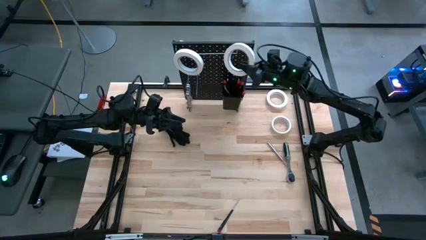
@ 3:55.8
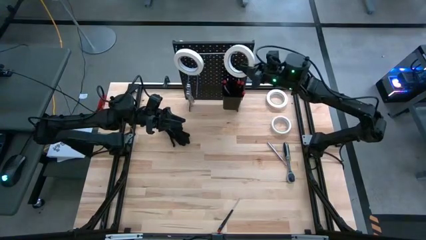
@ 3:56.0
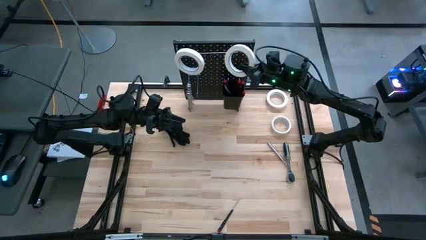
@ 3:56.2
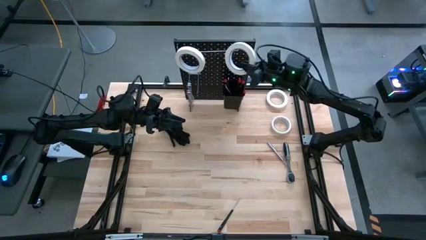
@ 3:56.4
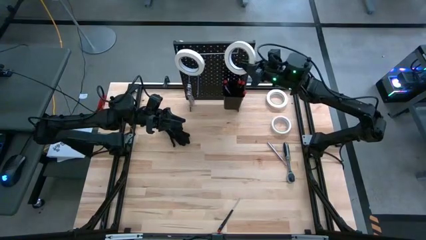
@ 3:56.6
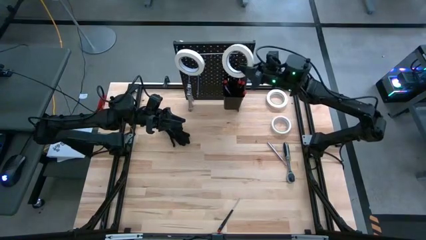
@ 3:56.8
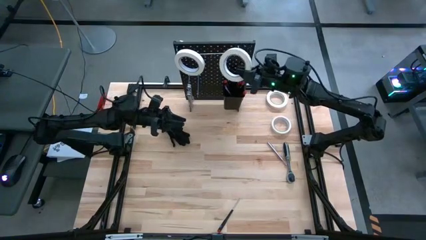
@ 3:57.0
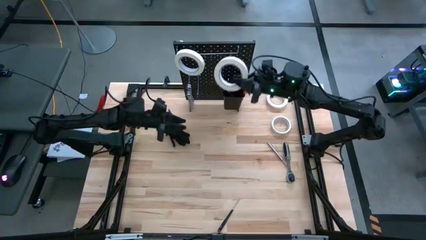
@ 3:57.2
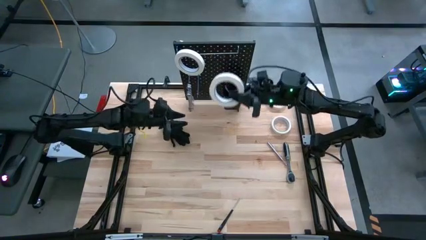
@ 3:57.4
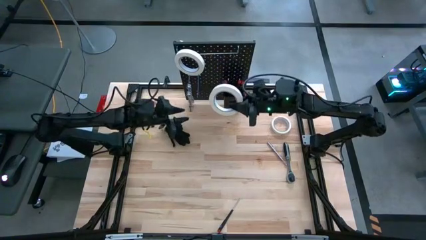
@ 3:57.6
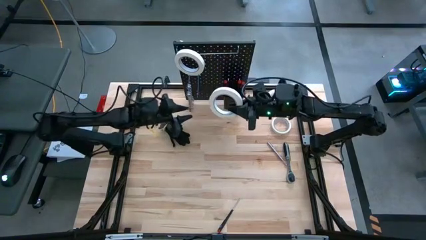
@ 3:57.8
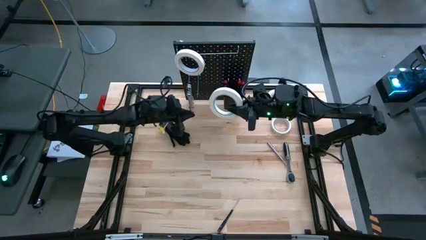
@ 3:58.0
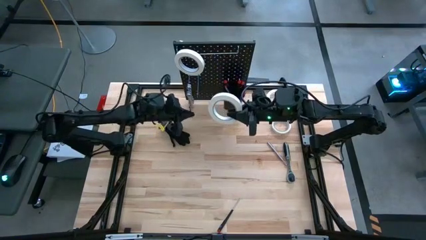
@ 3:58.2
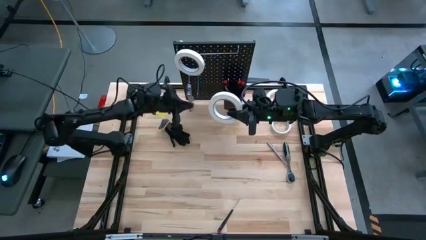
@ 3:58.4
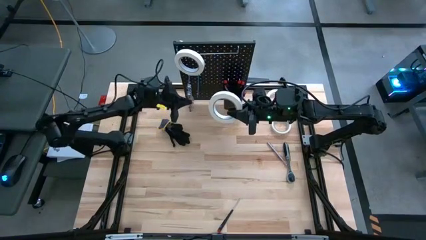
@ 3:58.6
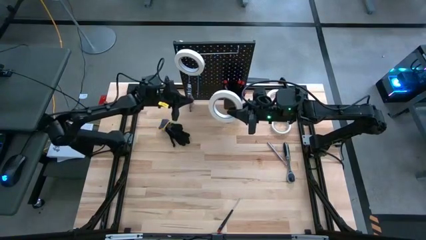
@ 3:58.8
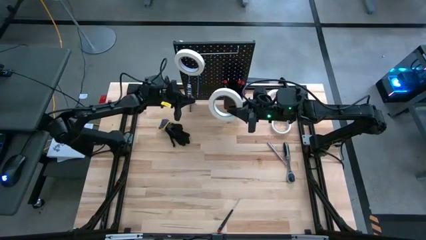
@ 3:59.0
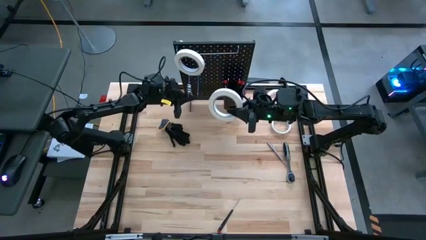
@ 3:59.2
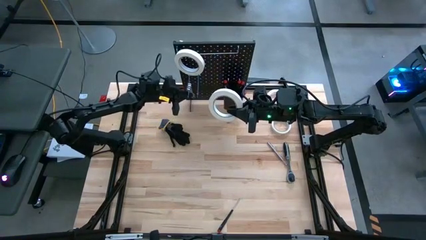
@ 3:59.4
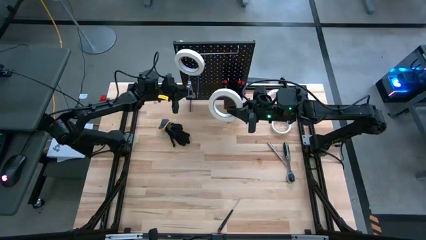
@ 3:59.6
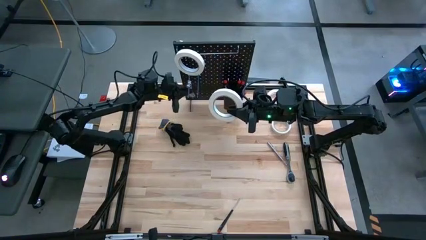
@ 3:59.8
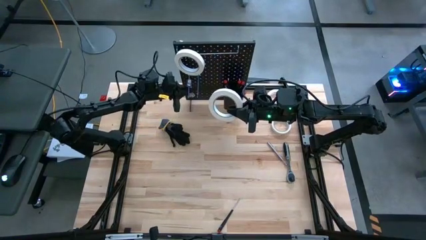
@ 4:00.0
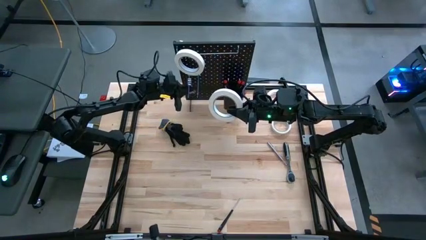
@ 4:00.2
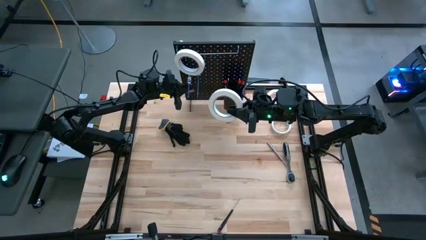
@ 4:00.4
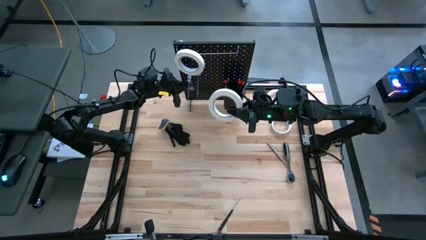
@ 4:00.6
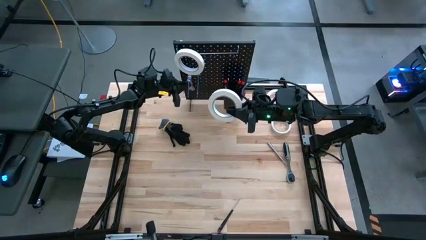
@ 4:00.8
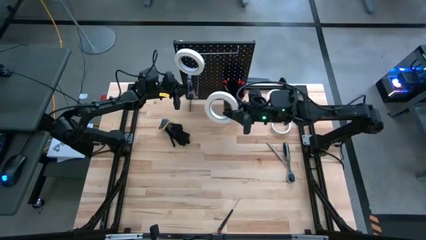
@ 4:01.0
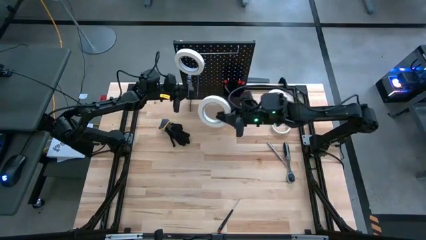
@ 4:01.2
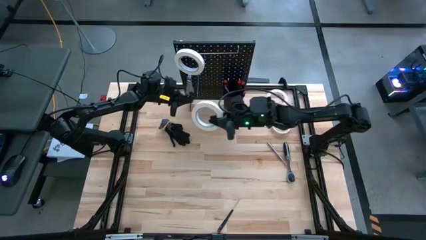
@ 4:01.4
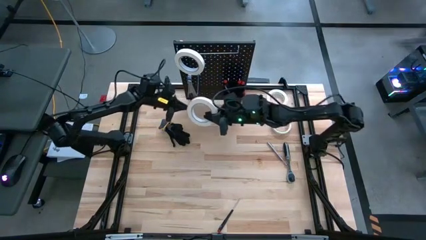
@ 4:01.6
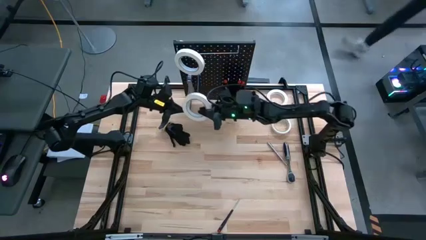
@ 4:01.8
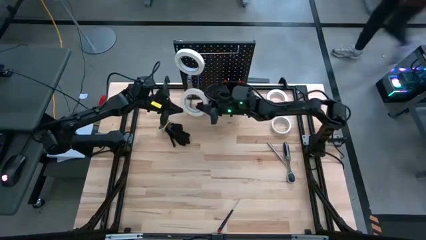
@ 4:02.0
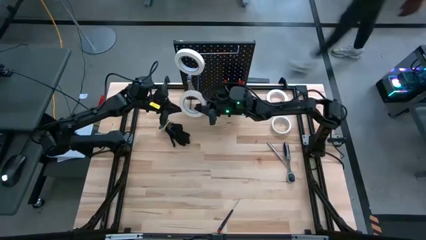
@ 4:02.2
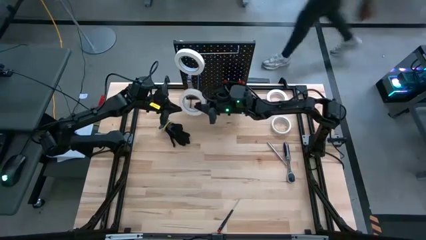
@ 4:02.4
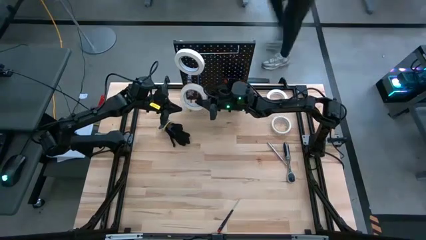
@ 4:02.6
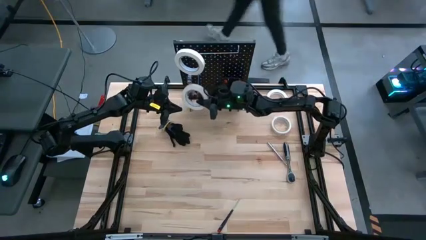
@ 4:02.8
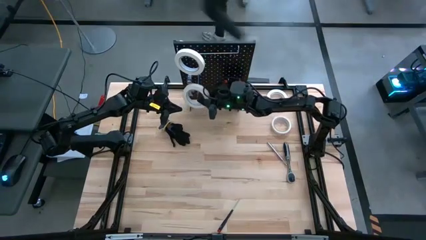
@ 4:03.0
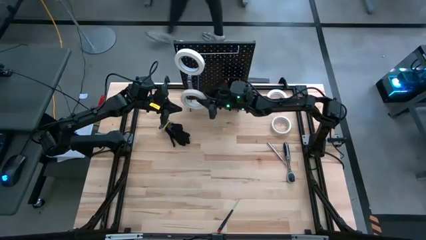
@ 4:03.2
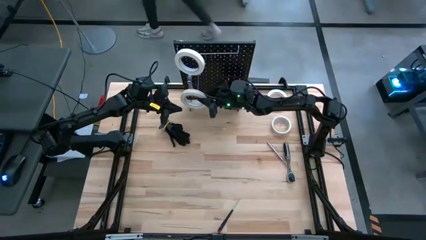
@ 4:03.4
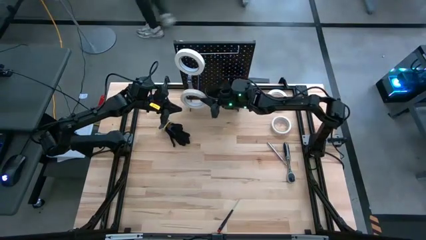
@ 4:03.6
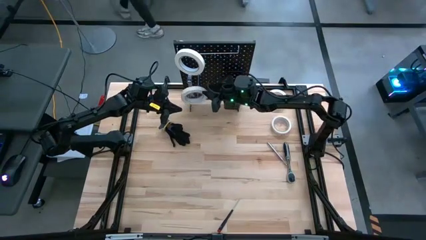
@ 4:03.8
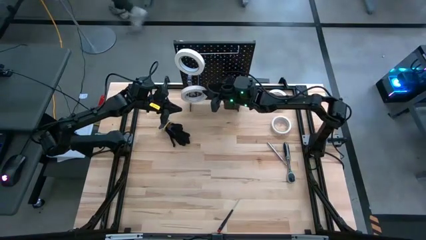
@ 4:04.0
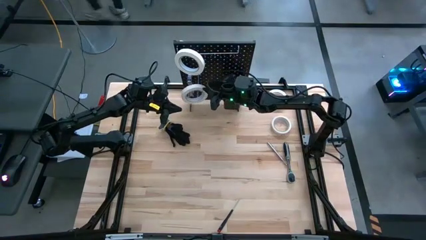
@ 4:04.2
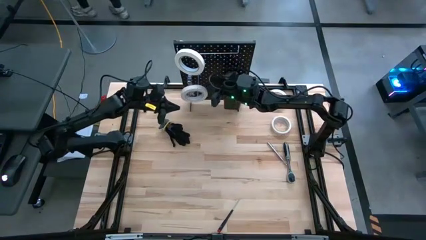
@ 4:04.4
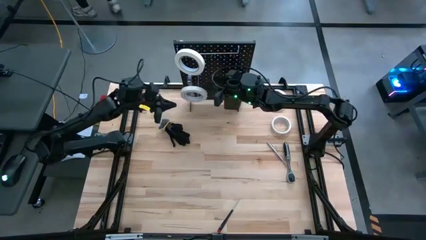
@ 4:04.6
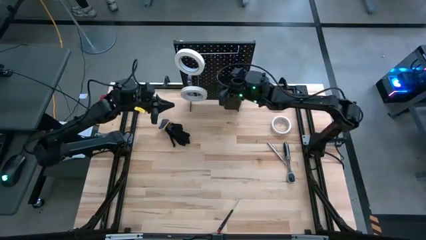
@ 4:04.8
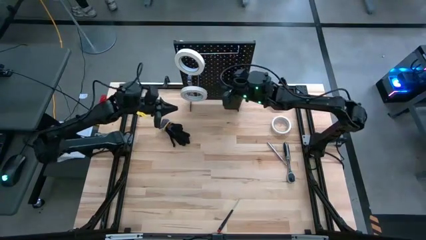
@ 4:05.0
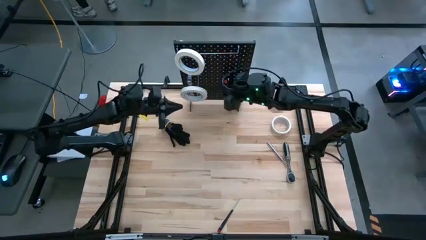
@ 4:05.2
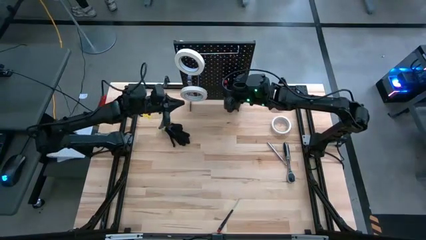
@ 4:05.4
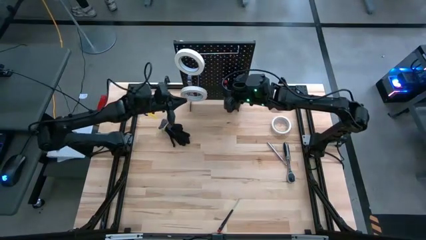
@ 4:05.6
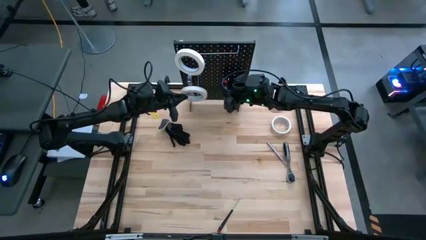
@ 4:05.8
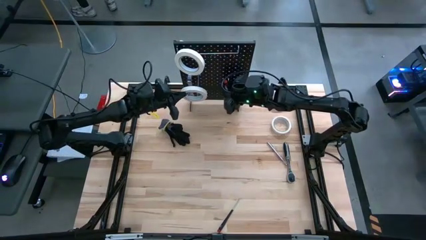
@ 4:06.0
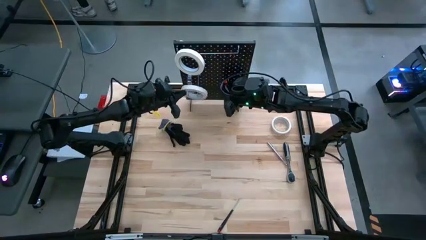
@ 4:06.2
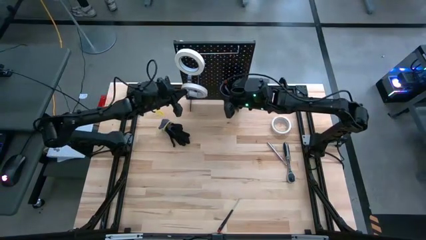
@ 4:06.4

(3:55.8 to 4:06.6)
Task: Hang tools onto peg board
Hang the white masking tape on the peg board

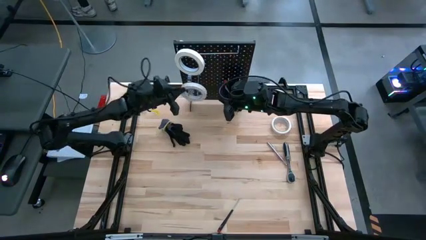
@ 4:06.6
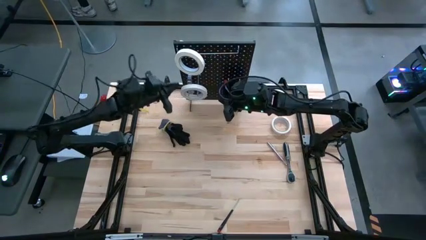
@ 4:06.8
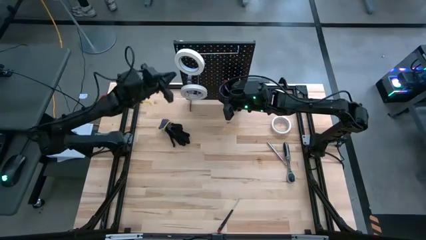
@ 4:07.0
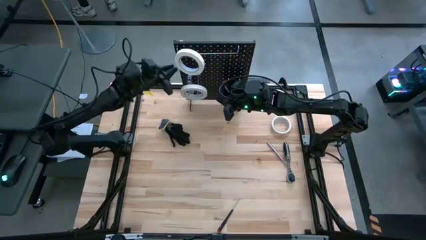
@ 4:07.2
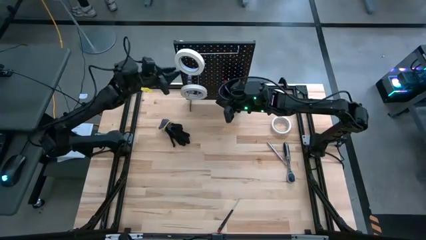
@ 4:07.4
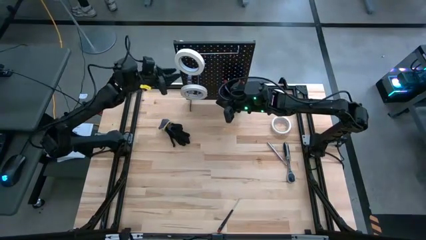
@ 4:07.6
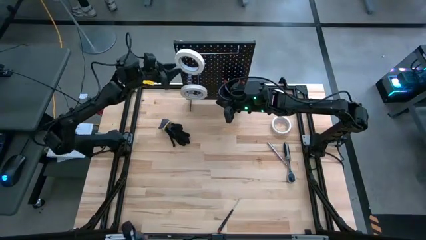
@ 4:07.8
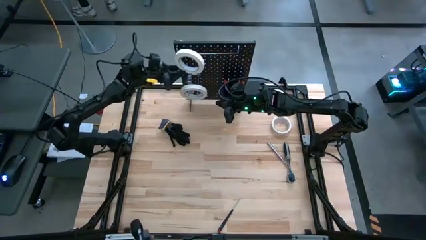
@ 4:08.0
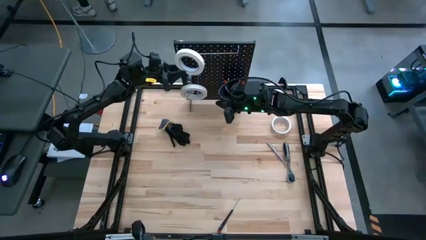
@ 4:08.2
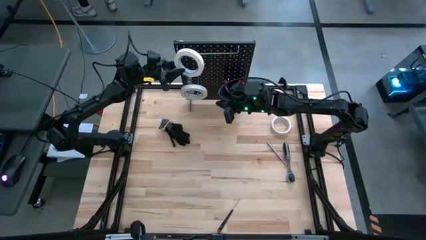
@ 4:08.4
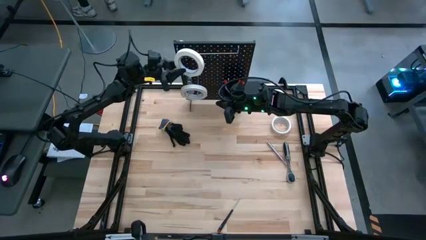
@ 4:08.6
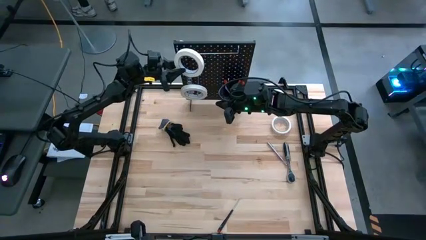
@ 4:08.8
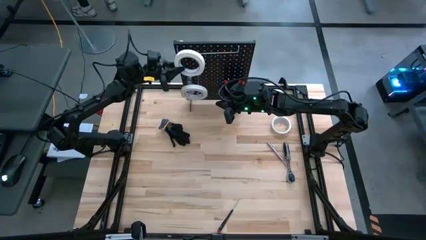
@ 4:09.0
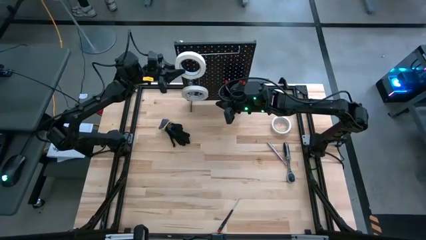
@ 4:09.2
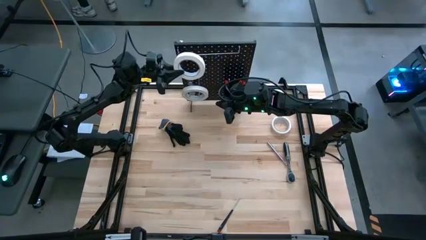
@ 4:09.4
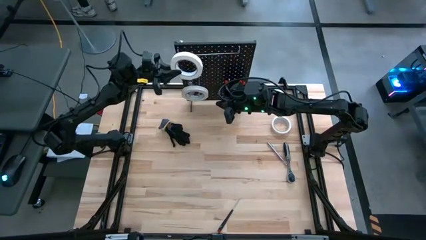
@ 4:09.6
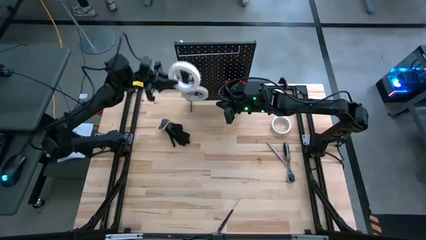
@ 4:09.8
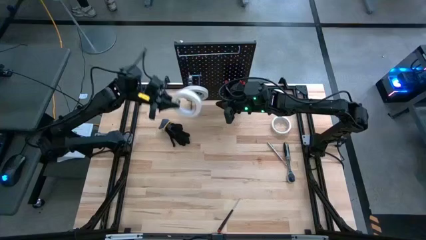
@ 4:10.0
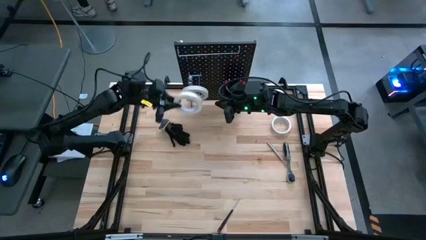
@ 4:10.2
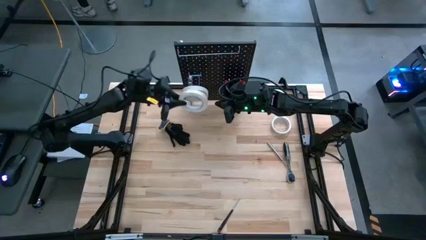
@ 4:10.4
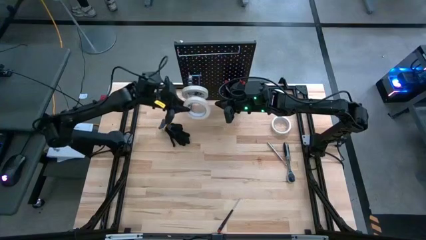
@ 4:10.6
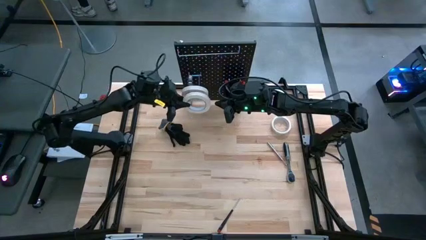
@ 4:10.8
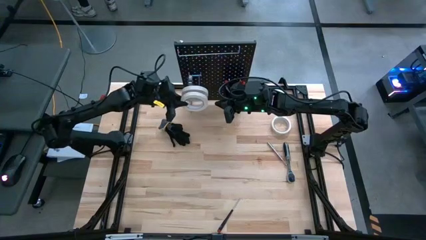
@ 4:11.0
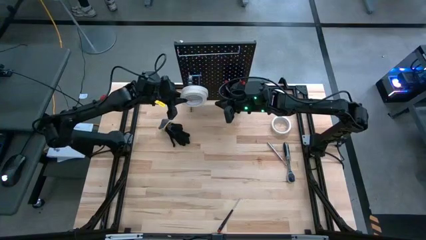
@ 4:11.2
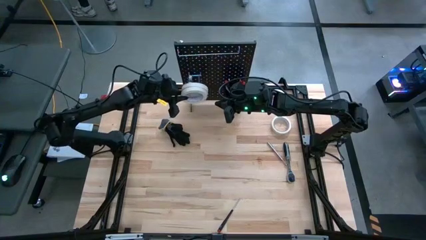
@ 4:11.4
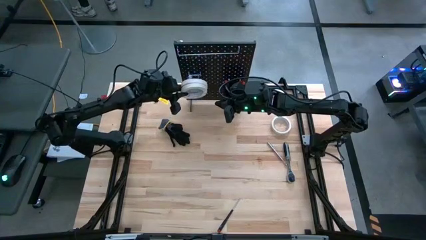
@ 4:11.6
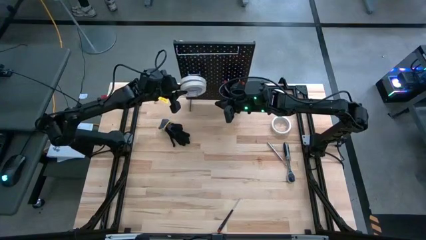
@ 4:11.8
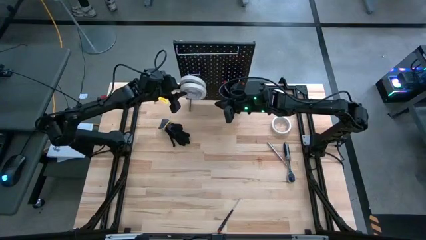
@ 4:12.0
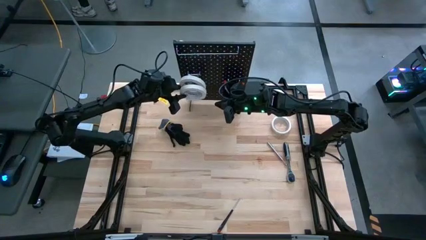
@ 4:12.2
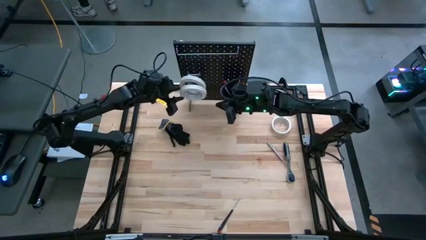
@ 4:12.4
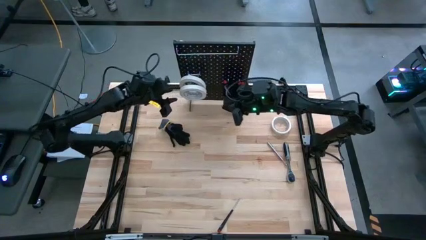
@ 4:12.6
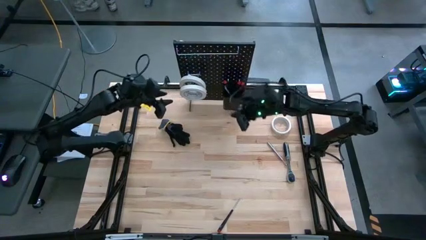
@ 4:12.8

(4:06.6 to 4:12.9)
Move the white masking tape to the bottom on the peg board
